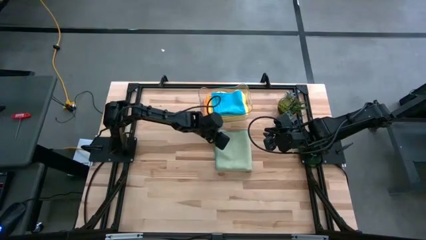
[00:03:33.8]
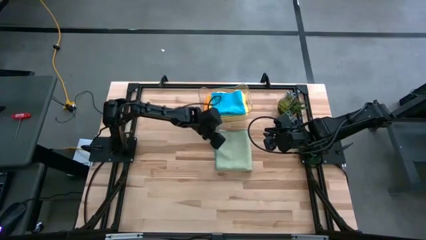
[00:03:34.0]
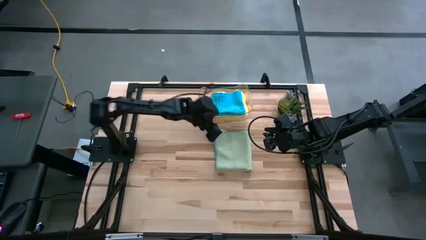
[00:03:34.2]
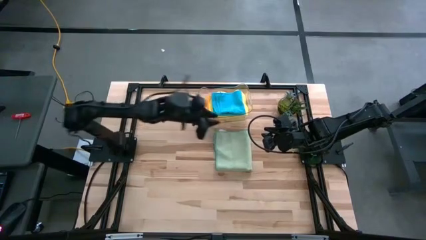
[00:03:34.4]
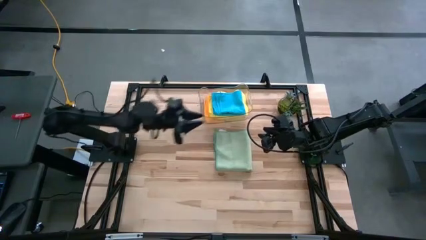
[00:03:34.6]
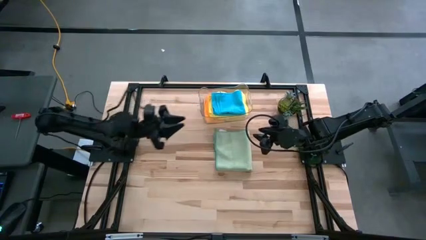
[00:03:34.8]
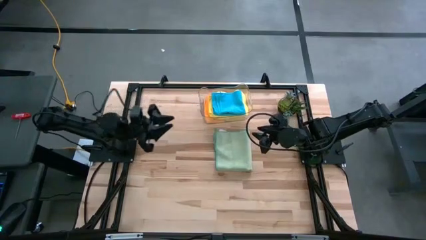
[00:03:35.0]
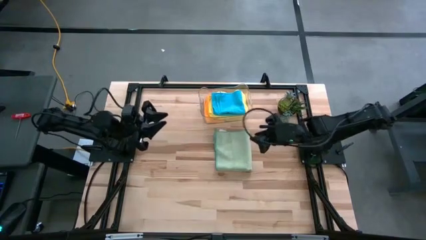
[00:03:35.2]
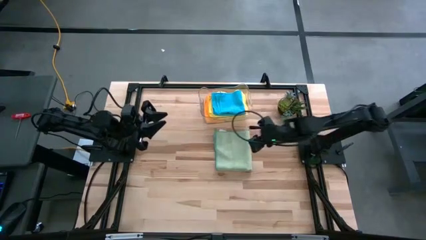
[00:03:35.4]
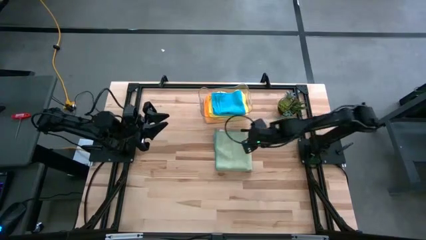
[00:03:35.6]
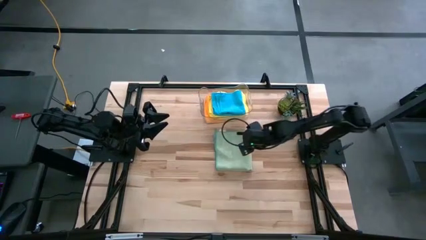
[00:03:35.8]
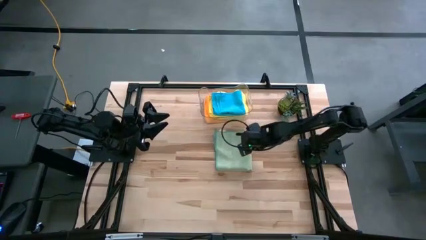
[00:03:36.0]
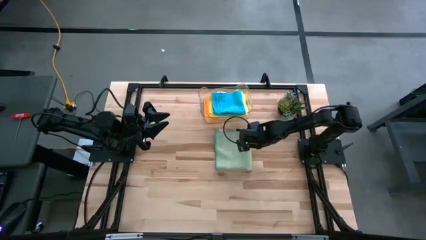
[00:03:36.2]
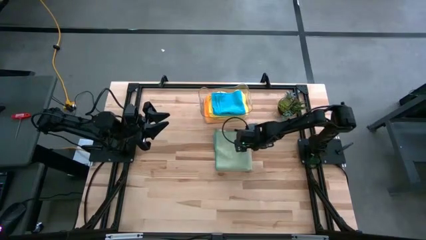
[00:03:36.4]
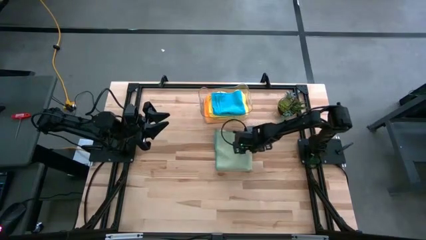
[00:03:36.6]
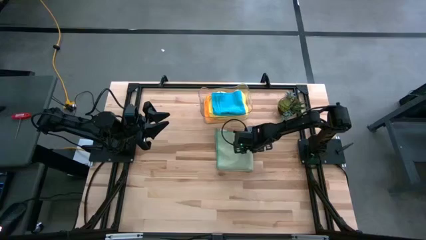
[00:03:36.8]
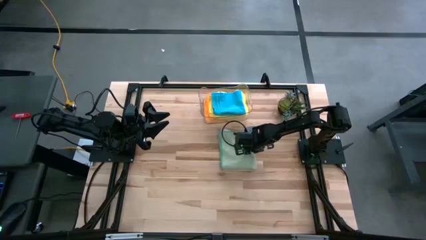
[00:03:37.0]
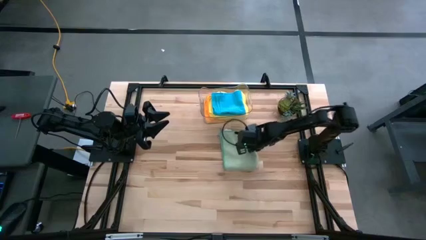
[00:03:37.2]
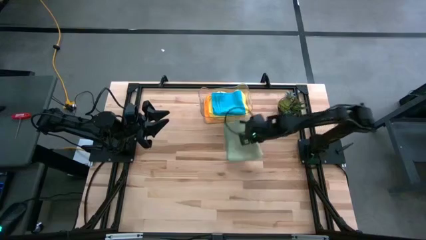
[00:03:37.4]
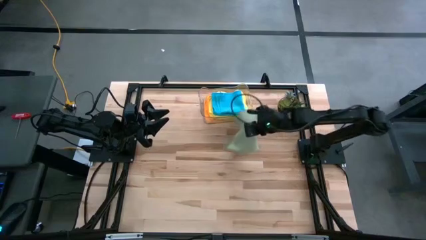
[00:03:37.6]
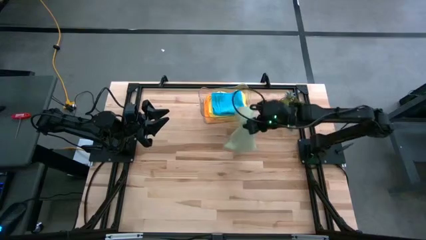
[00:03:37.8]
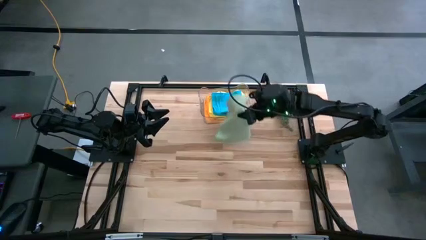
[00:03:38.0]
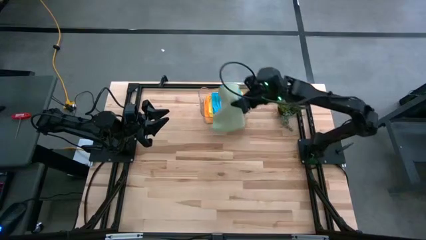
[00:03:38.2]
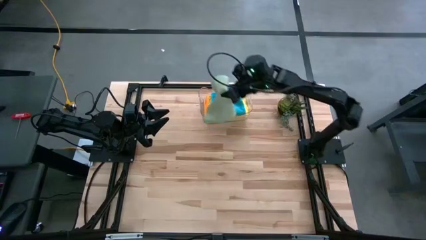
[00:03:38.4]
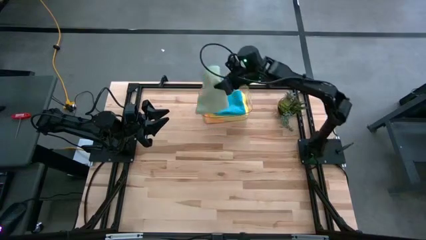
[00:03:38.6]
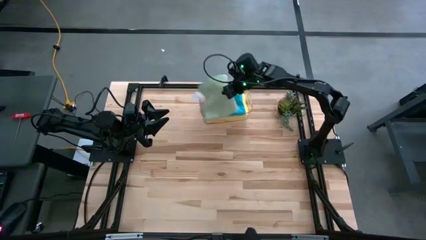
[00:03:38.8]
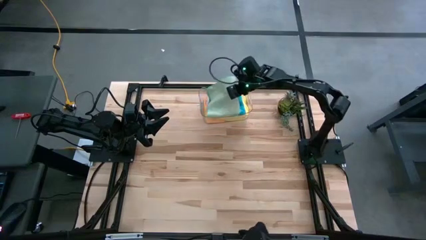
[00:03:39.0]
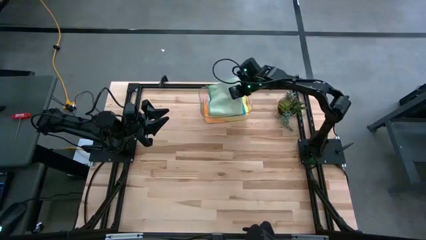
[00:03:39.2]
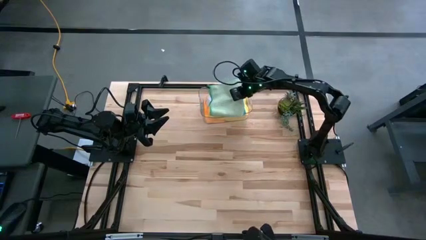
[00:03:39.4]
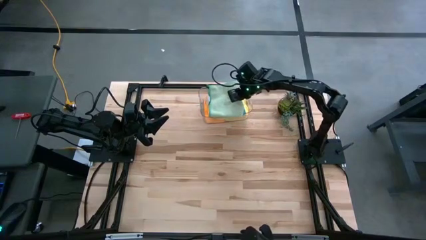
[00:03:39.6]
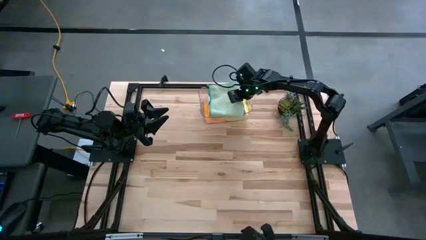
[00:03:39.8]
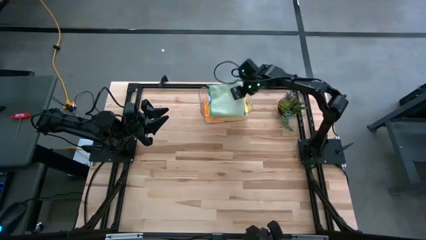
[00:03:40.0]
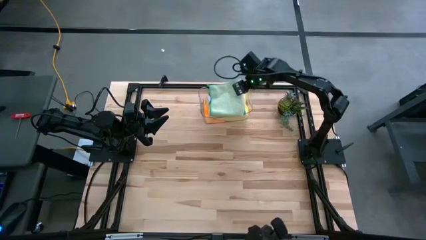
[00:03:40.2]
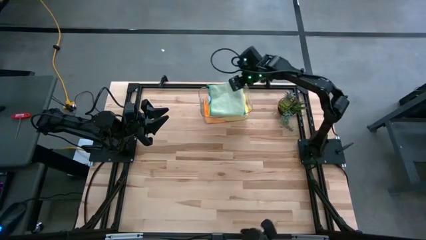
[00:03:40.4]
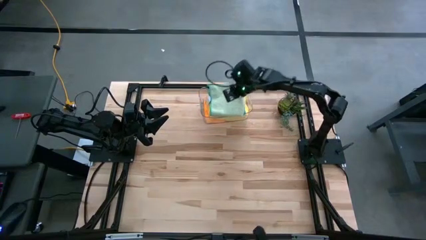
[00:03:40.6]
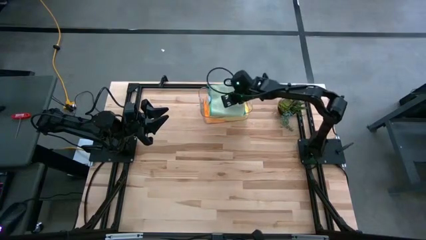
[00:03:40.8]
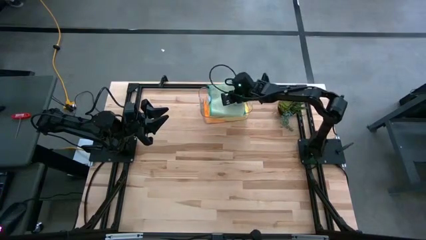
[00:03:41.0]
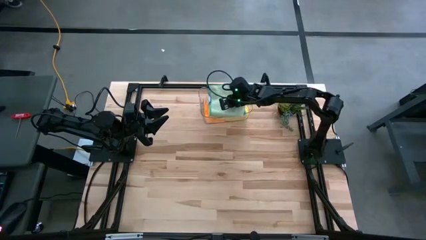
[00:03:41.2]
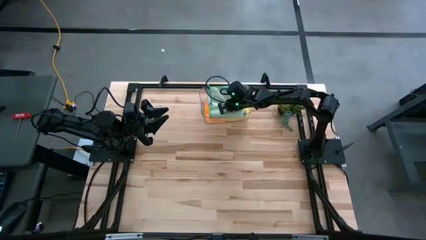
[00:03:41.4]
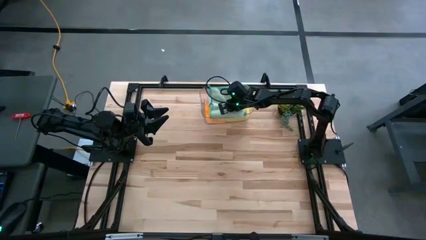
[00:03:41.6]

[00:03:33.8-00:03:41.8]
Task: Fold microfiber towels
Put the light green microfiber towel into the transparent bin

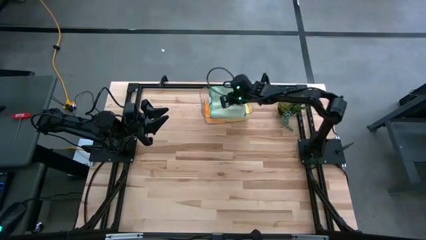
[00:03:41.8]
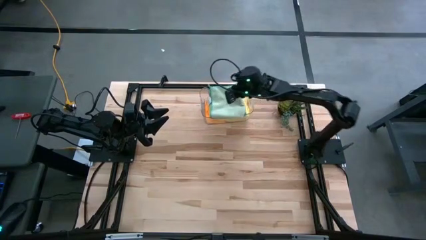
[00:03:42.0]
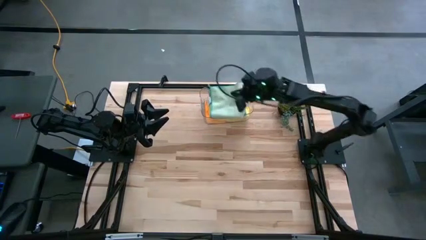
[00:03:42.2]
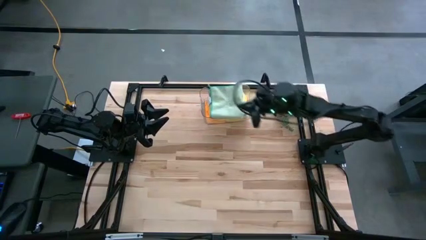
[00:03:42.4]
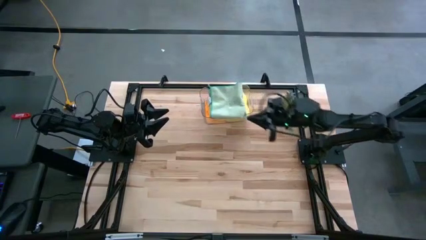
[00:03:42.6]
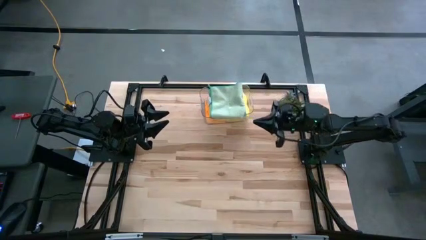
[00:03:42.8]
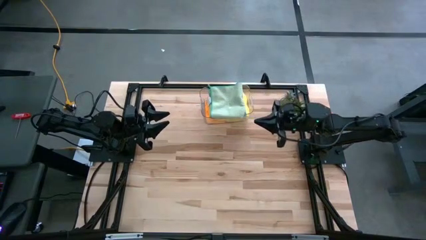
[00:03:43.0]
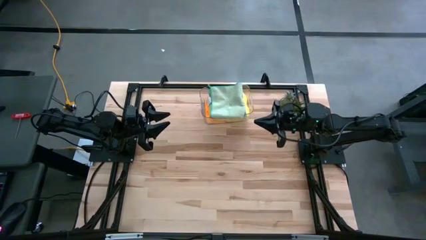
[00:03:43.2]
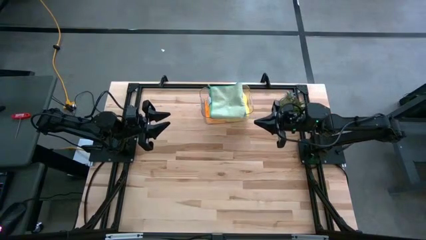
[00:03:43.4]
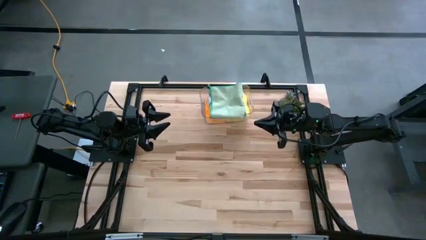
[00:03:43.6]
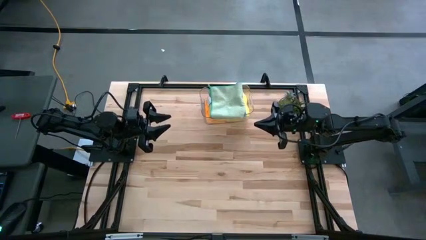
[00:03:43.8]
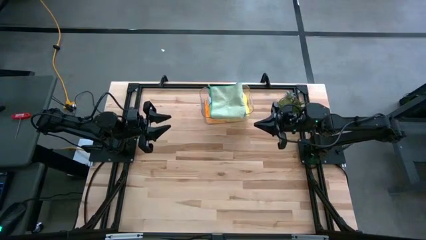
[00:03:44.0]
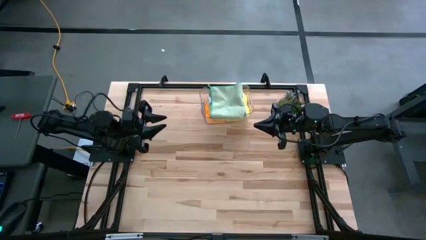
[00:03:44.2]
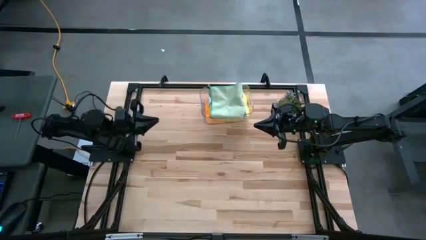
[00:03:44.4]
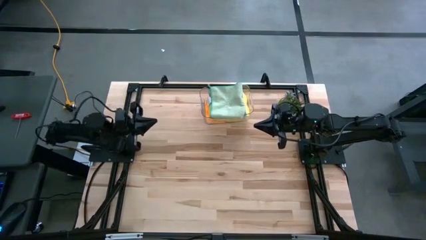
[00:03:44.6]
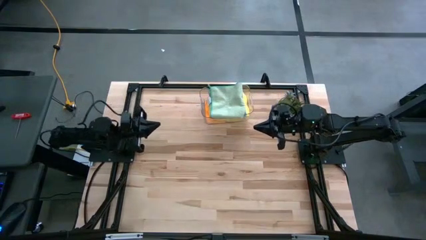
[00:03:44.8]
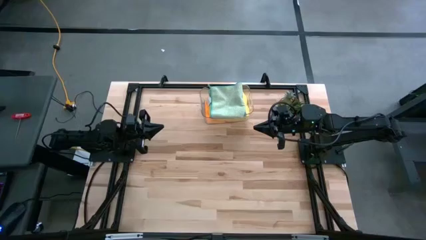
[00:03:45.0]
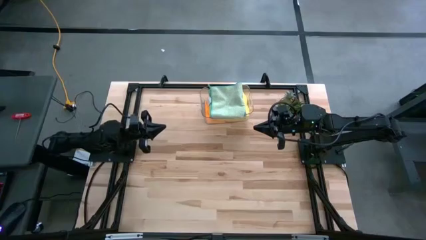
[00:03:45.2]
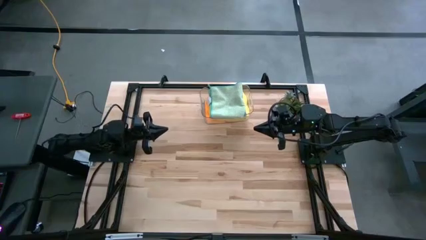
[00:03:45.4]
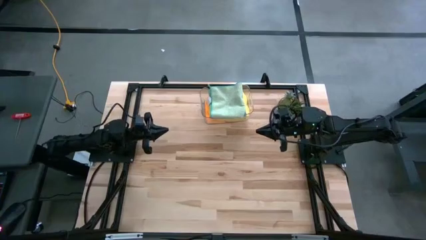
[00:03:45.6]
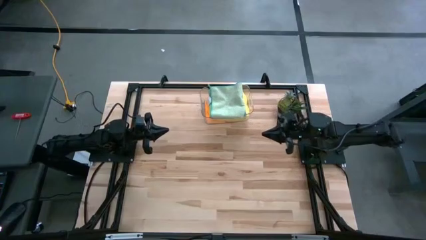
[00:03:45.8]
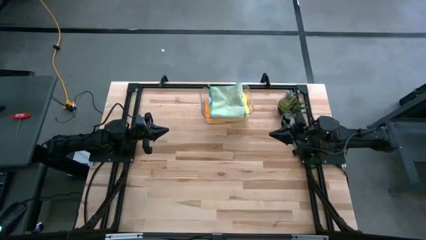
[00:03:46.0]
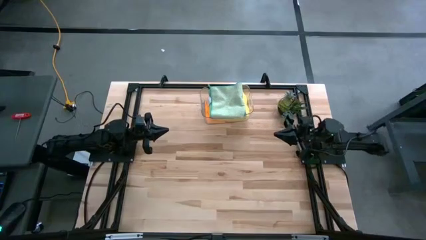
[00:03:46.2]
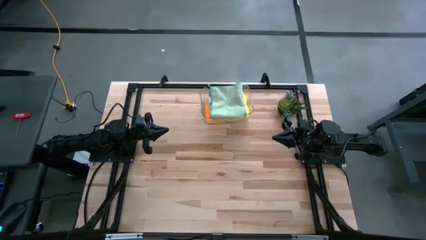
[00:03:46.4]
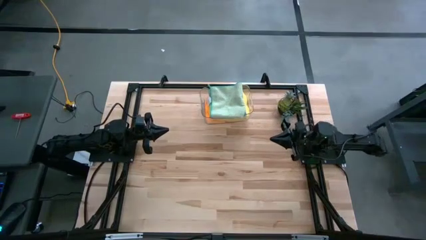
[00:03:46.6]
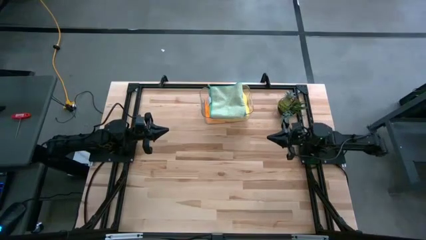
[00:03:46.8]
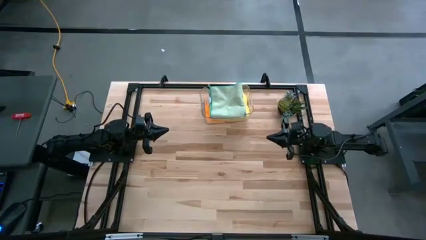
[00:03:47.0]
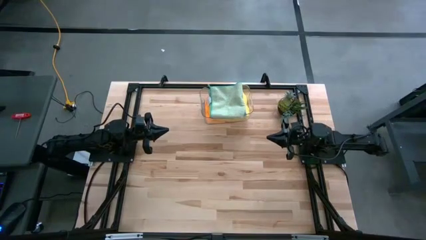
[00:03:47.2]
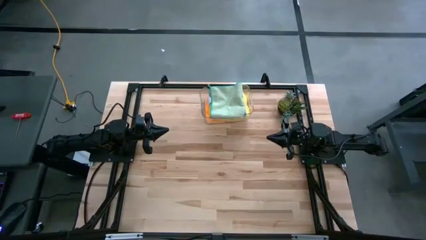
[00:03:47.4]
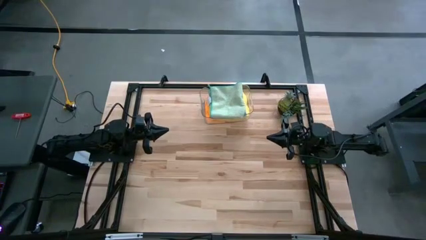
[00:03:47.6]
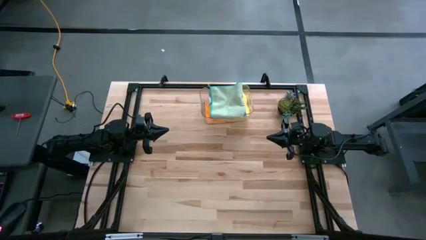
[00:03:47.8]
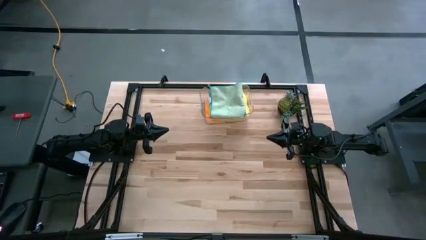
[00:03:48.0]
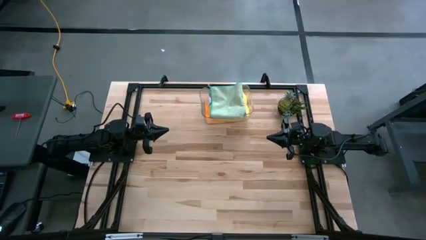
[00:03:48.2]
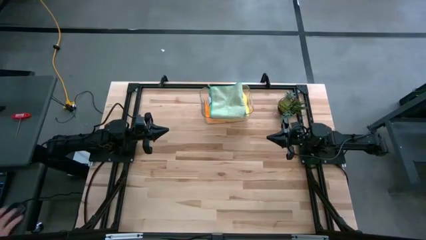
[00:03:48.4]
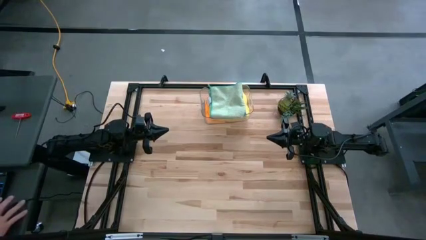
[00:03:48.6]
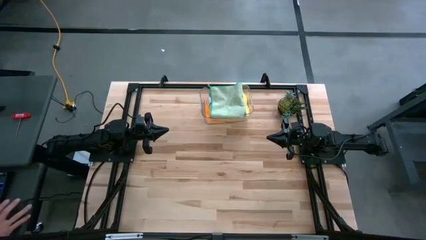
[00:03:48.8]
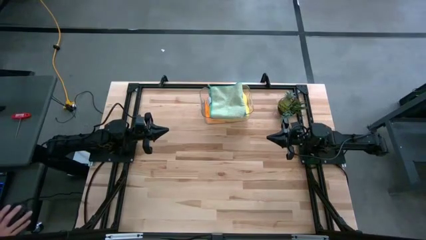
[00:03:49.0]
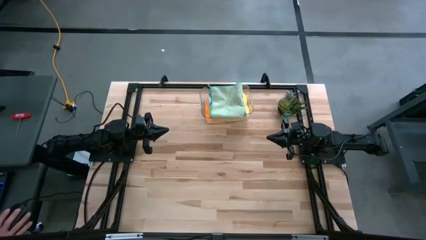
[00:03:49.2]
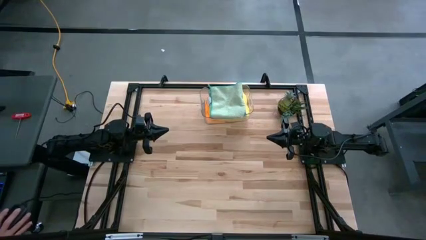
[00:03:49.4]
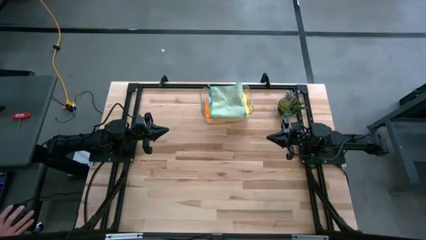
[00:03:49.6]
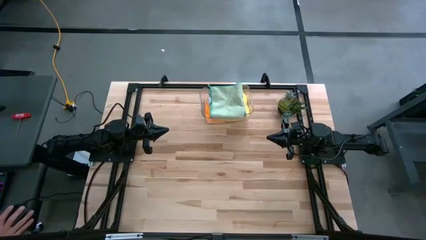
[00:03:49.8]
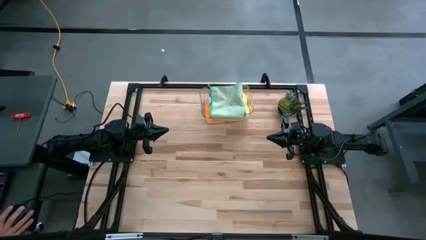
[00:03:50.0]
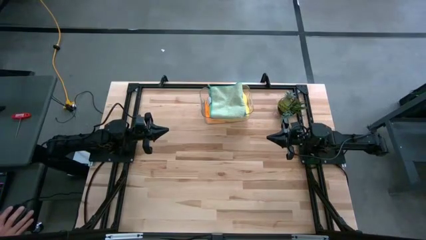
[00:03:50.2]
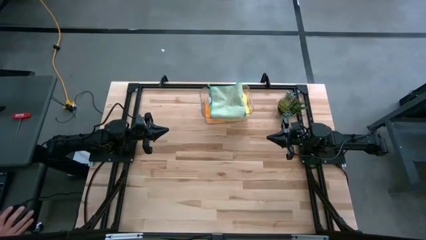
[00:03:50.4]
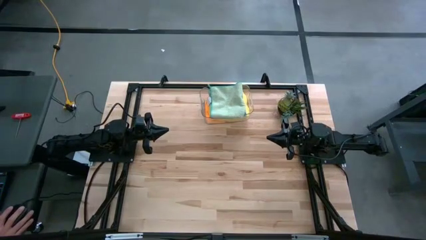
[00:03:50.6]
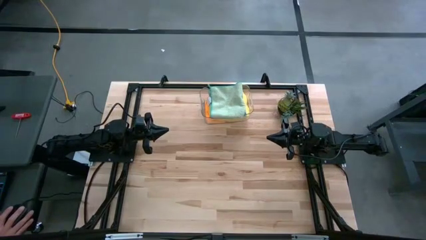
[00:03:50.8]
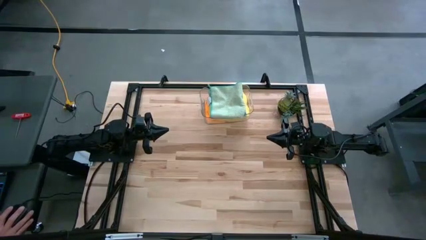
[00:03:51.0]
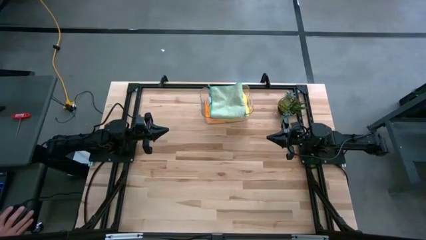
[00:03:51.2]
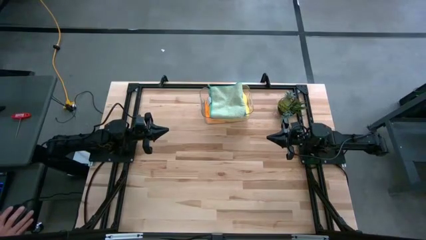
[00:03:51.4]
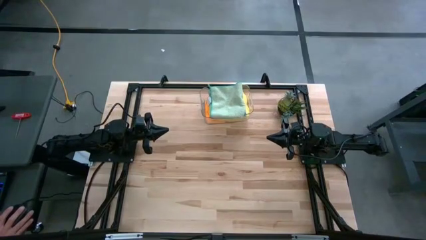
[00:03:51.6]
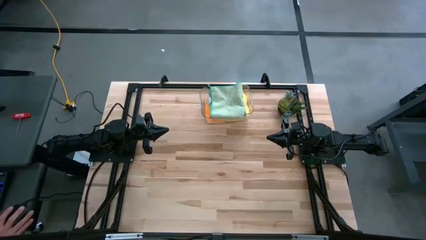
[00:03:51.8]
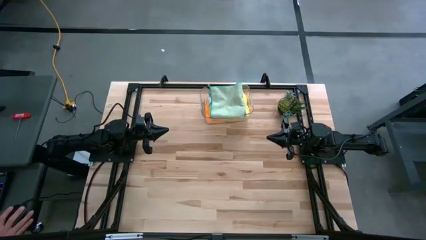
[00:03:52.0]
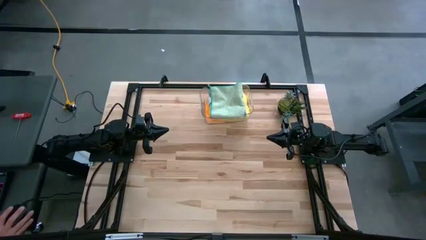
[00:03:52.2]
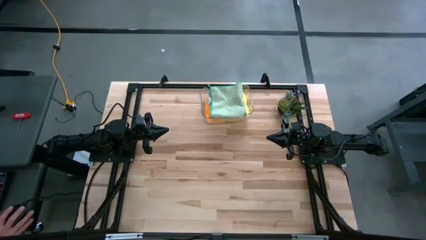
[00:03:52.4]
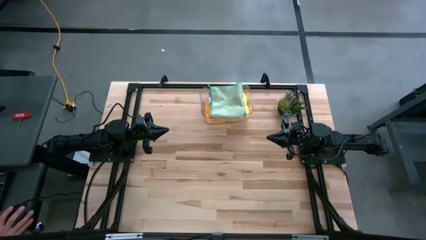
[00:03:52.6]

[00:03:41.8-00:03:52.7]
Return to Home Position
